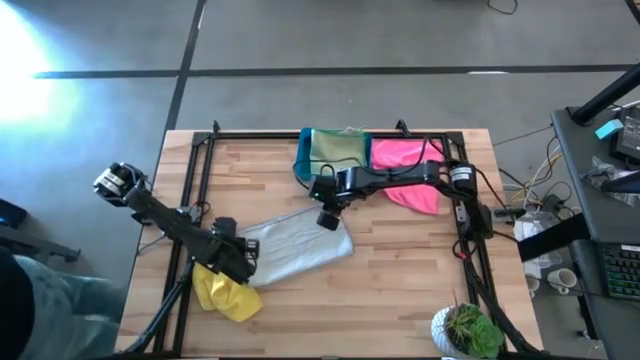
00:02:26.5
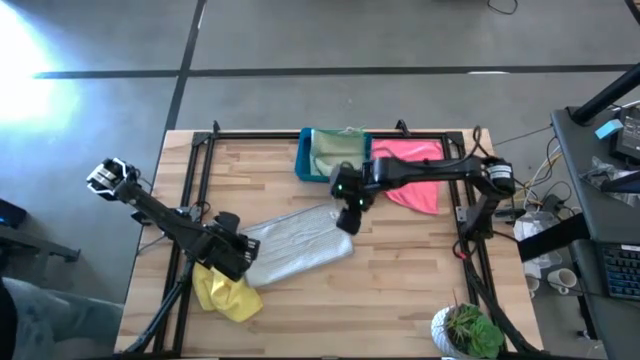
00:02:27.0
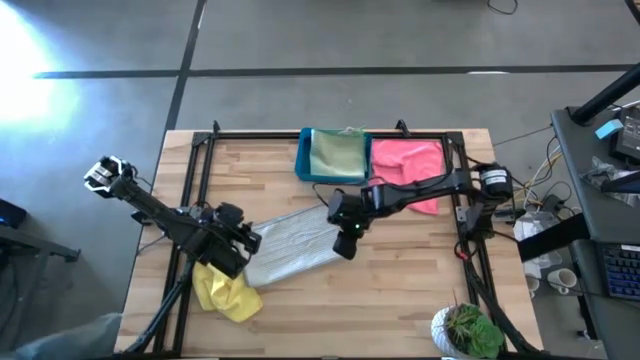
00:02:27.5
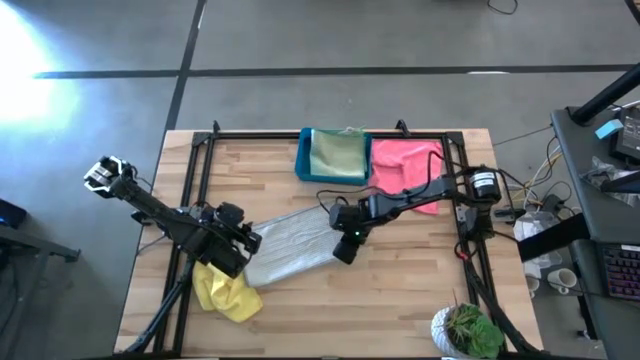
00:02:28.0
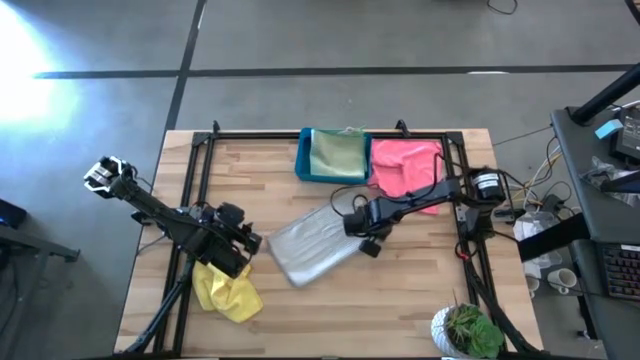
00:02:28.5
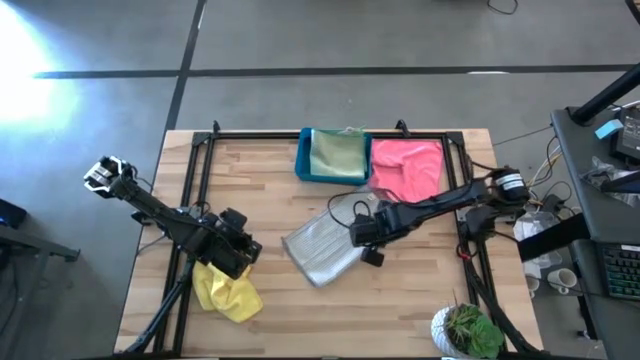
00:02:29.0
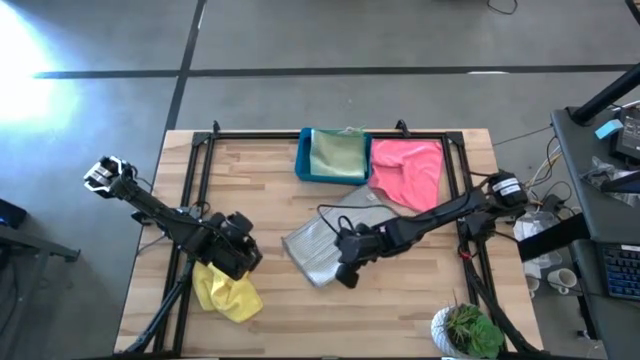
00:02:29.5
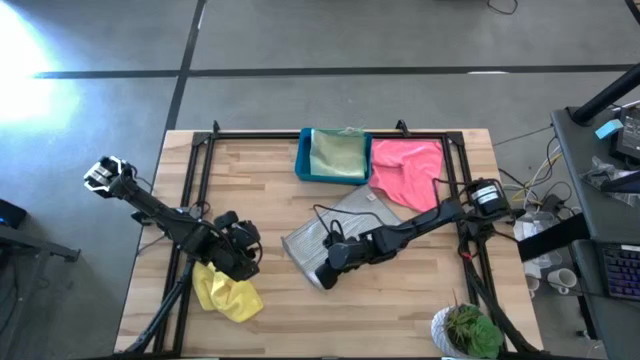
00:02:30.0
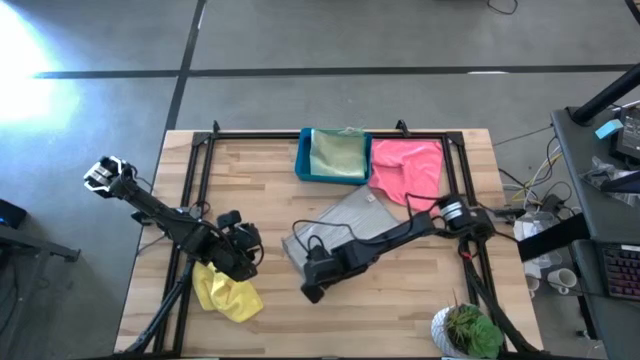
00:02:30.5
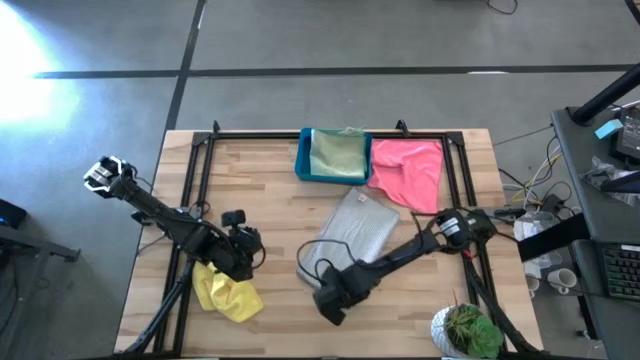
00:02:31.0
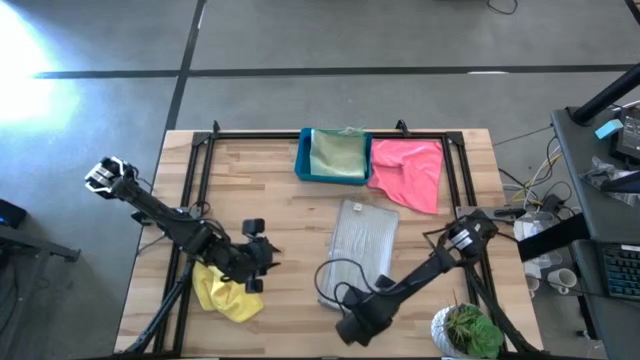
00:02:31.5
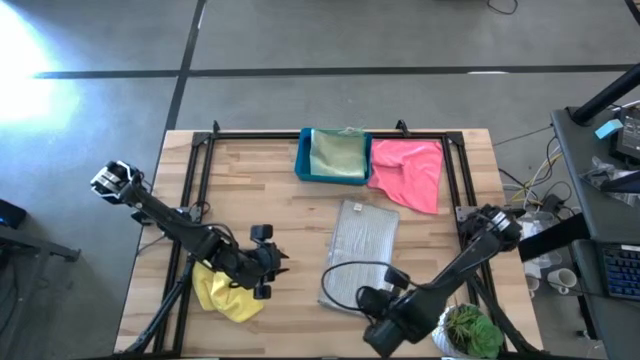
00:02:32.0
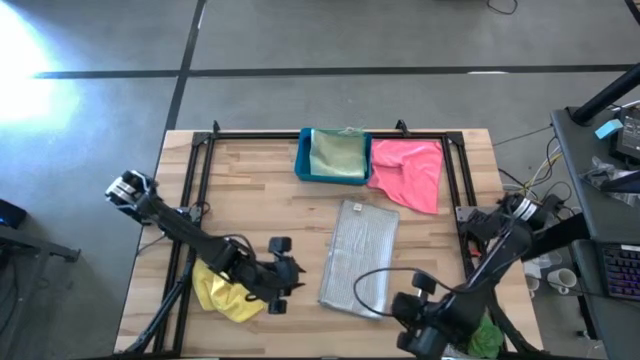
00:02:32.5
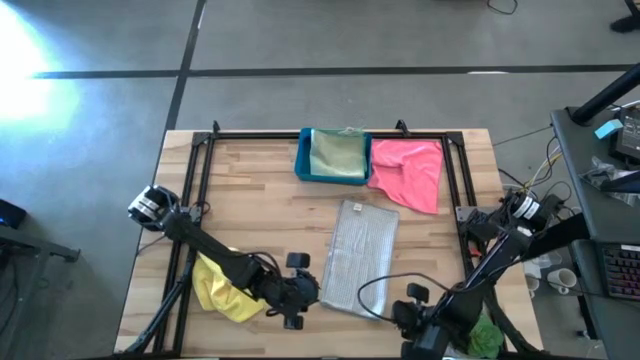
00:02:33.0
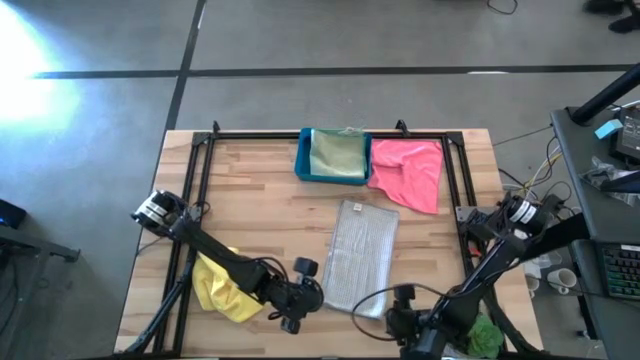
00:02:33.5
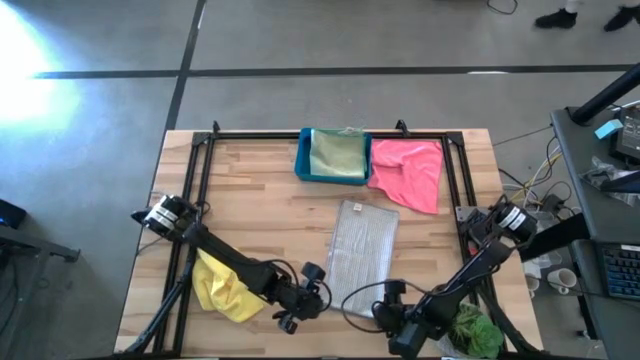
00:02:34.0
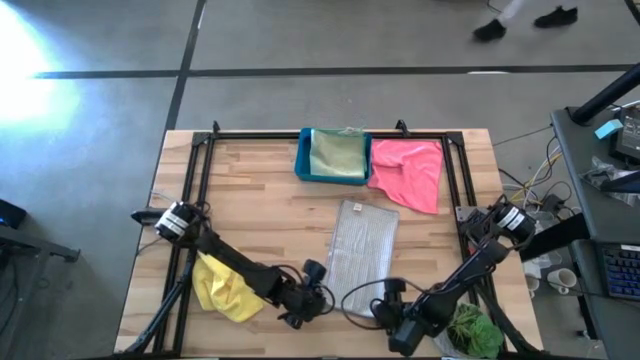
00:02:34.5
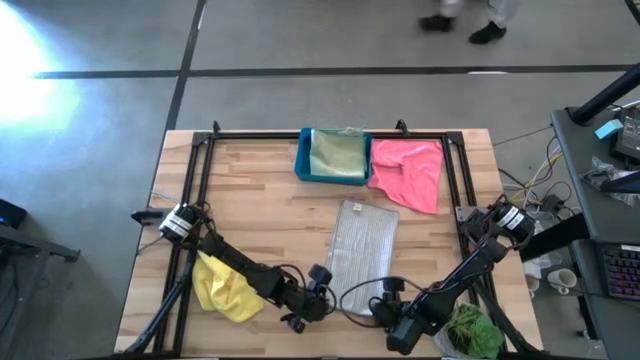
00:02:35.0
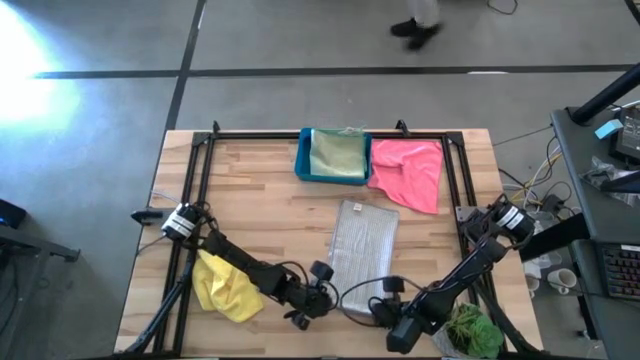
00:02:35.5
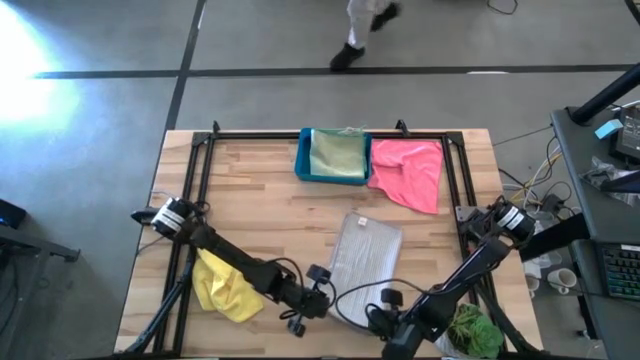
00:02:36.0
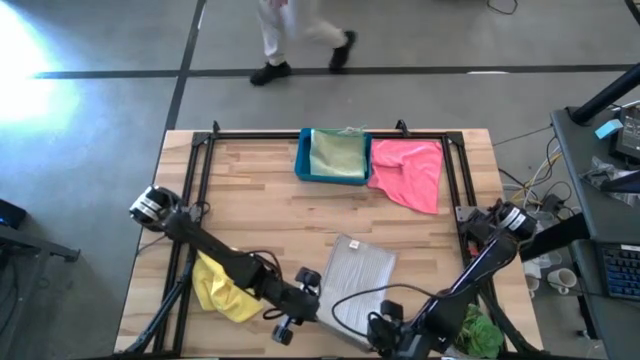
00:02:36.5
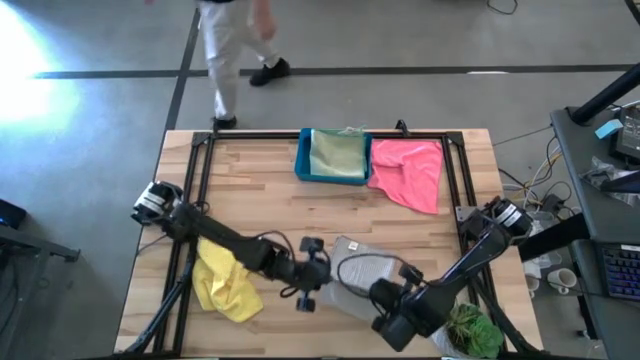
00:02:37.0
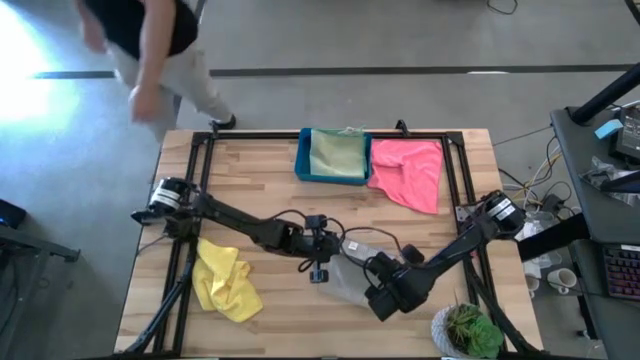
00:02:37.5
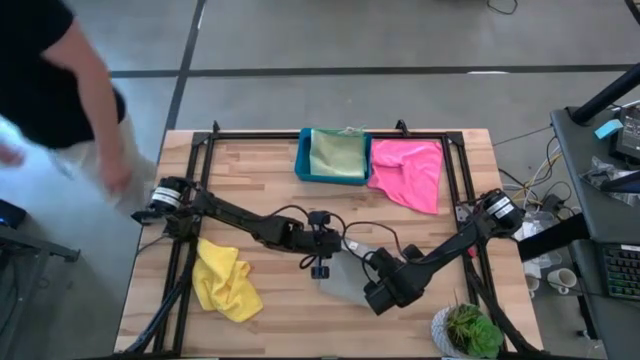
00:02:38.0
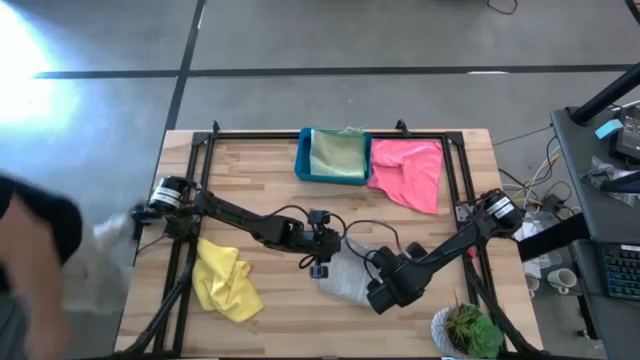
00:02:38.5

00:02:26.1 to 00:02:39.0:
Task: Fold microfiber towels
Fold the gray microfiber cloth

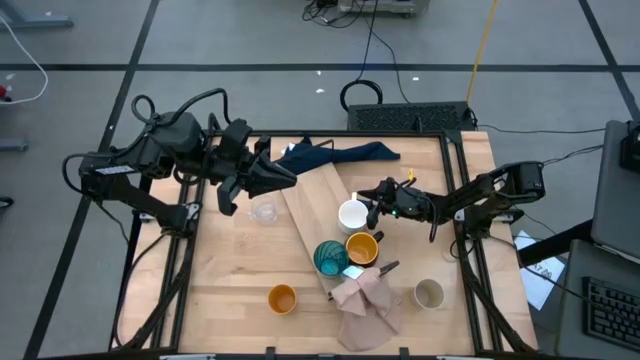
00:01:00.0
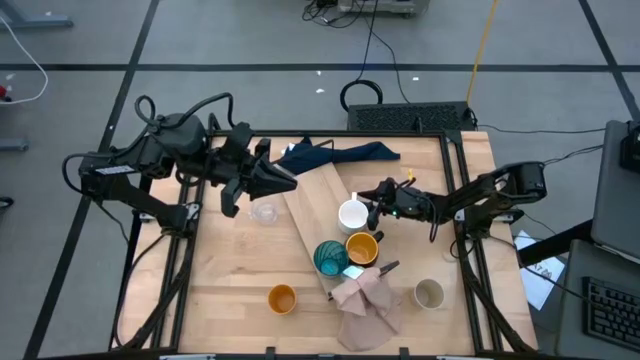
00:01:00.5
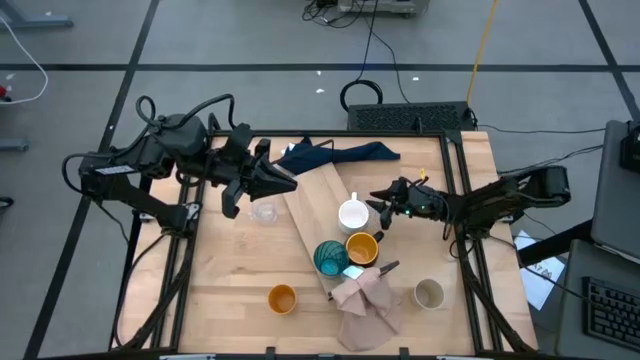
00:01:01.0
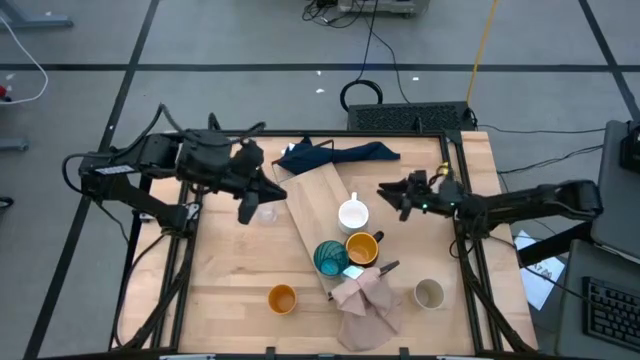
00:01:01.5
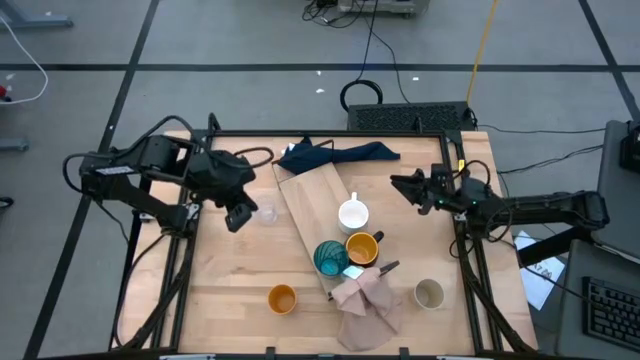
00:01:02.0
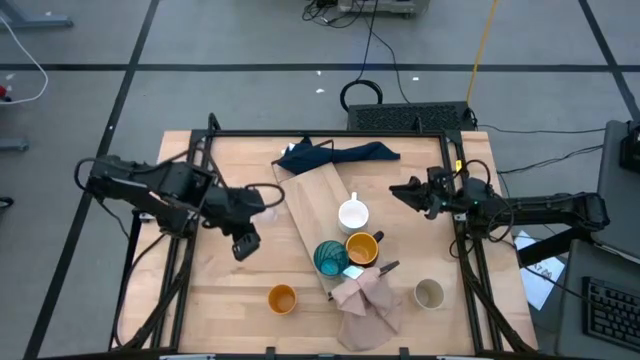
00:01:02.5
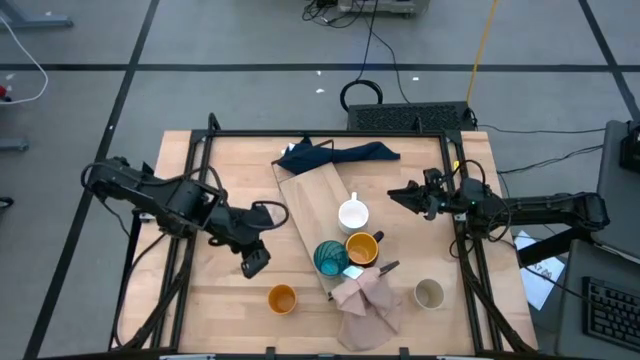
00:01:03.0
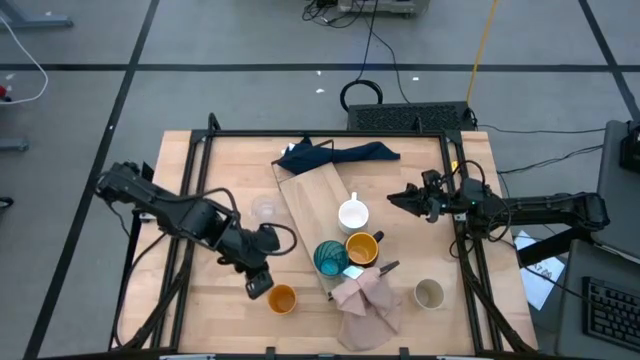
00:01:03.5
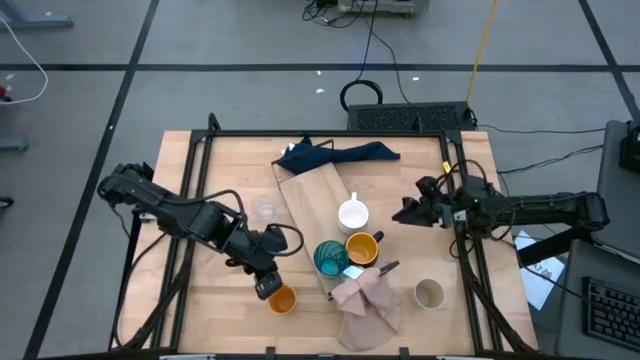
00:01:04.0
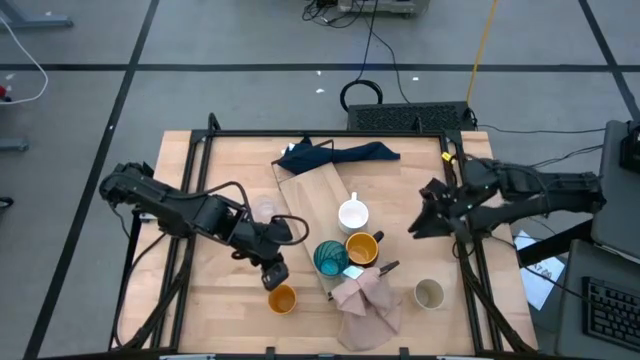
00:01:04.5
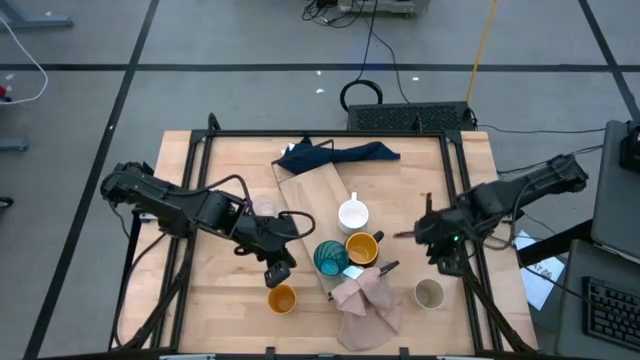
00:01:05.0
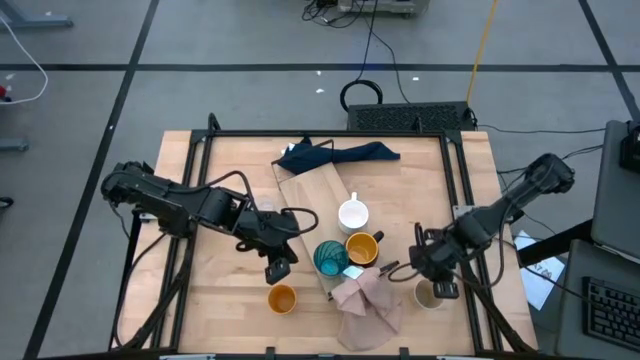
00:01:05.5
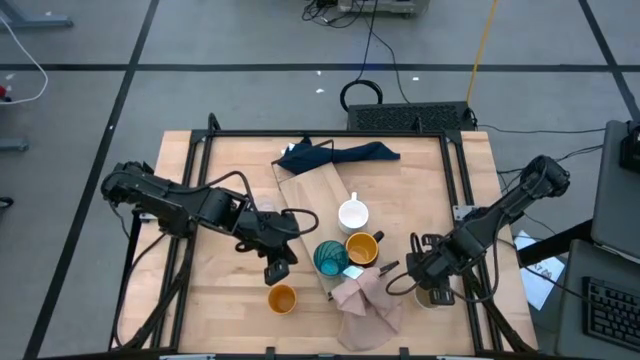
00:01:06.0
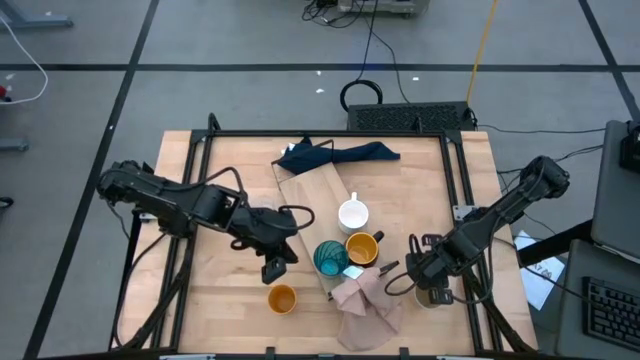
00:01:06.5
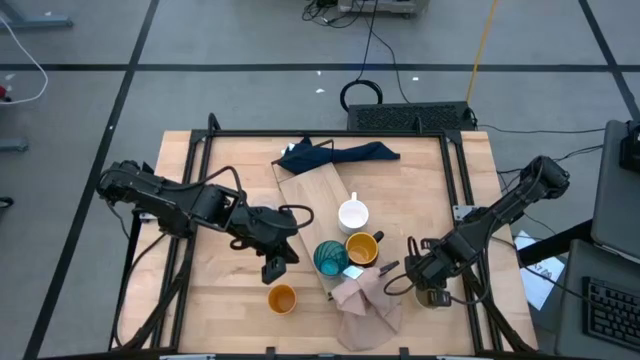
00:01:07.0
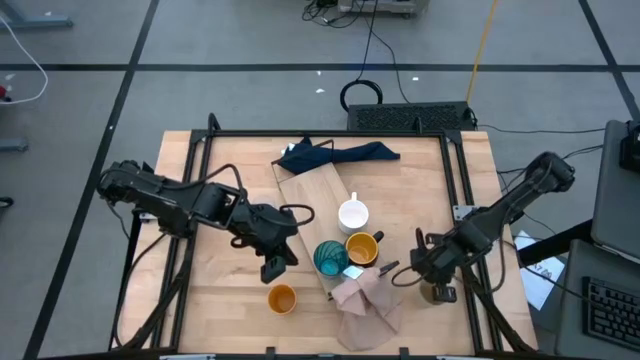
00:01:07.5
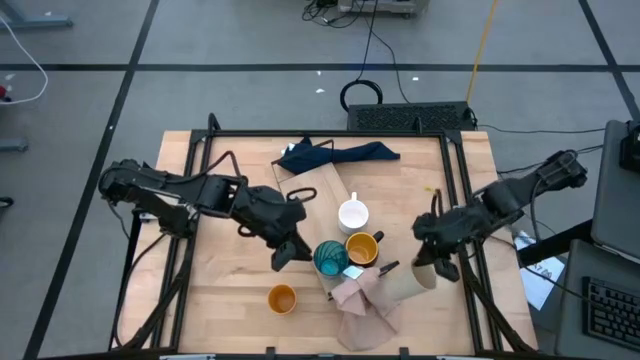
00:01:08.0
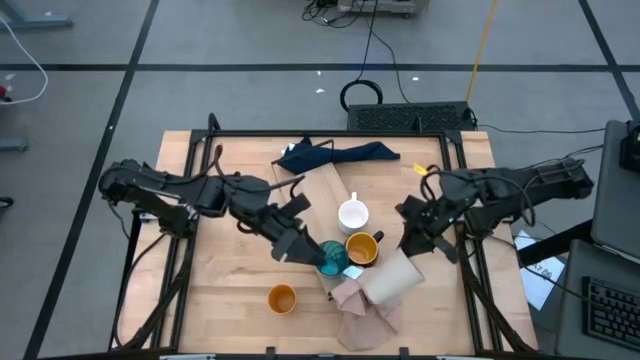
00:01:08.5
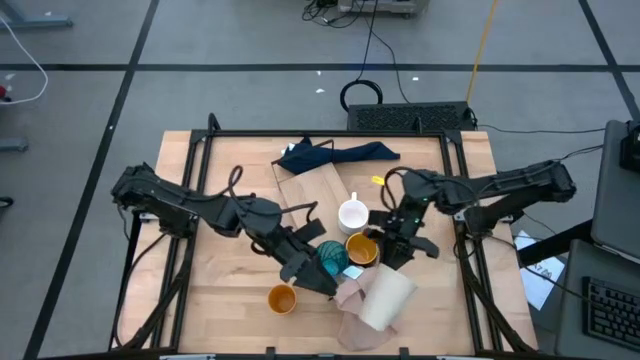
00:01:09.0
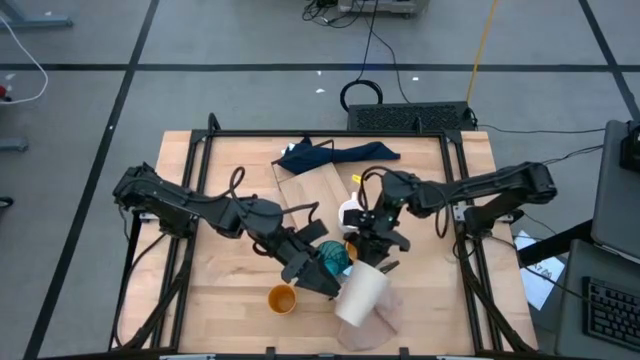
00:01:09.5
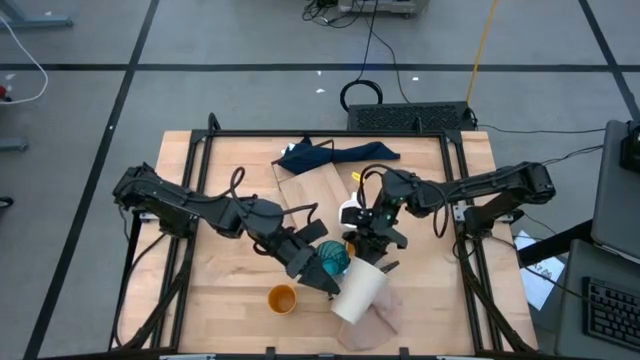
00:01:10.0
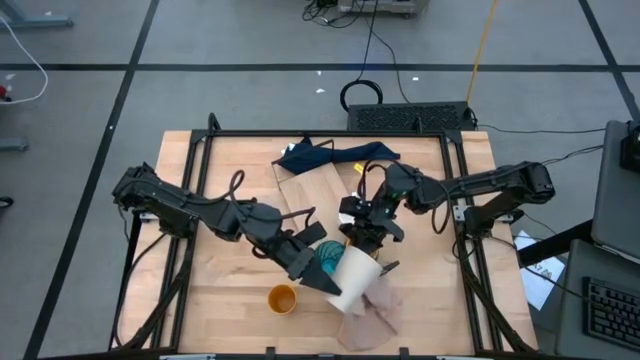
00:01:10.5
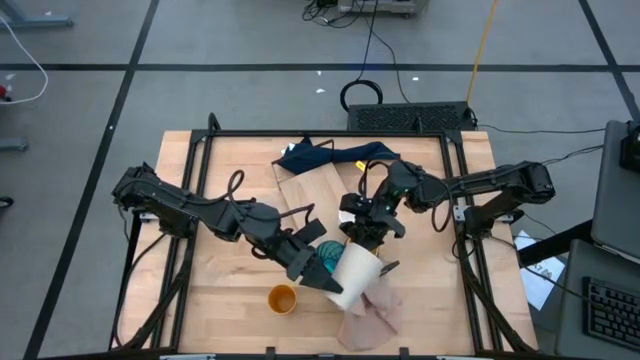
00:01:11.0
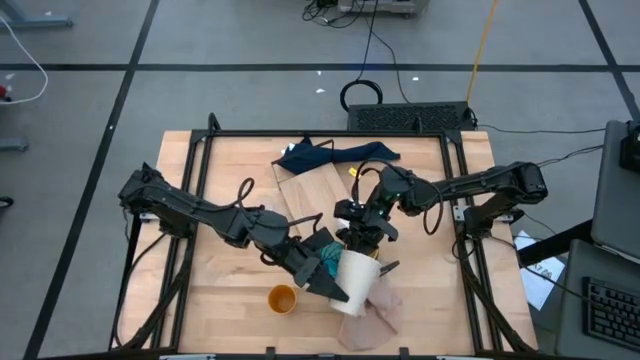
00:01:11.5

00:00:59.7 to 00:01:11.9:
Task: Stack small to large cups/mugs on shelf
Put the white cup on the shelf
